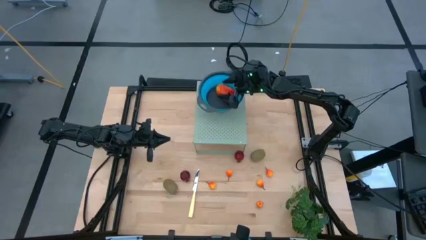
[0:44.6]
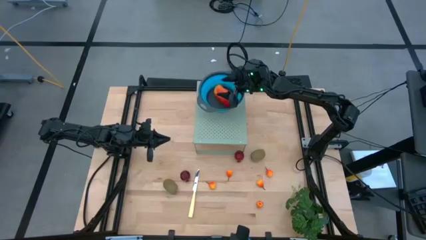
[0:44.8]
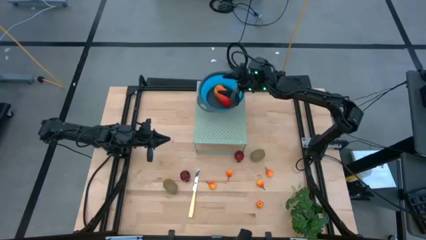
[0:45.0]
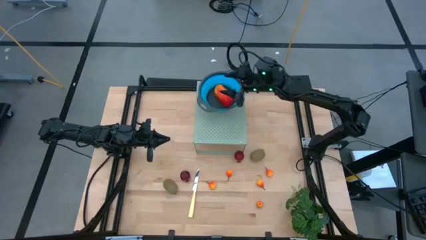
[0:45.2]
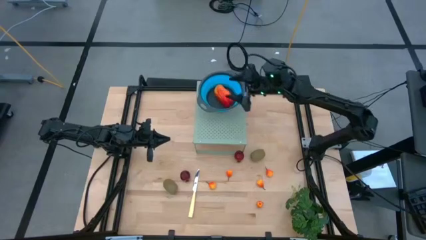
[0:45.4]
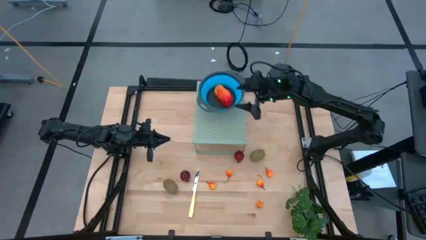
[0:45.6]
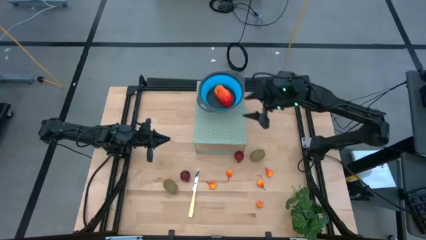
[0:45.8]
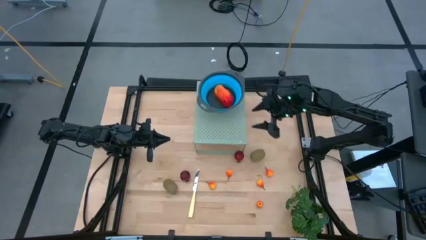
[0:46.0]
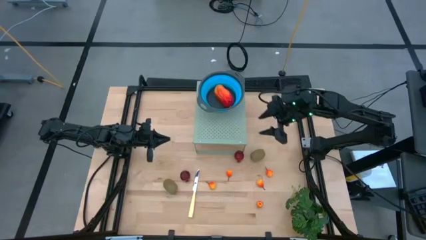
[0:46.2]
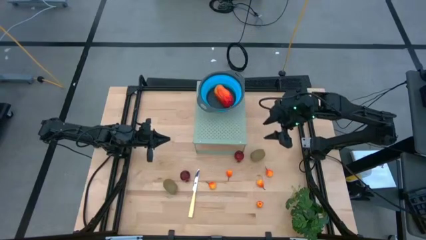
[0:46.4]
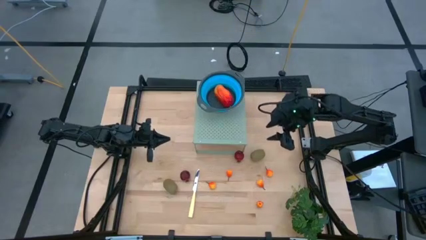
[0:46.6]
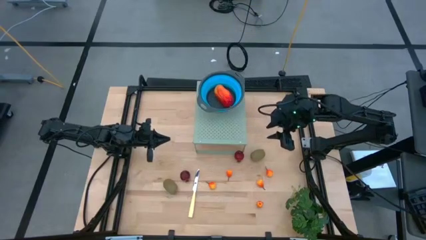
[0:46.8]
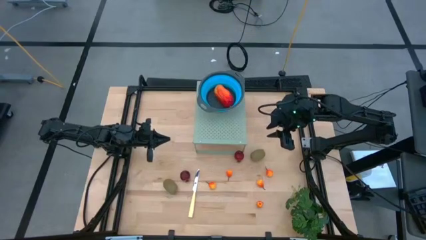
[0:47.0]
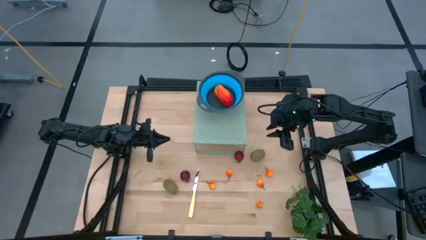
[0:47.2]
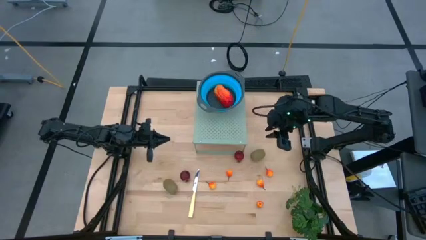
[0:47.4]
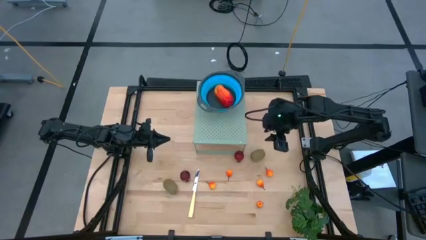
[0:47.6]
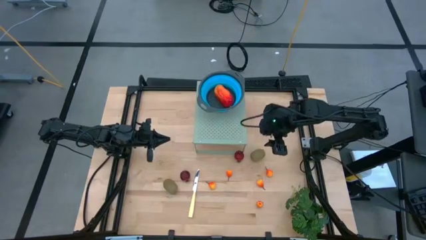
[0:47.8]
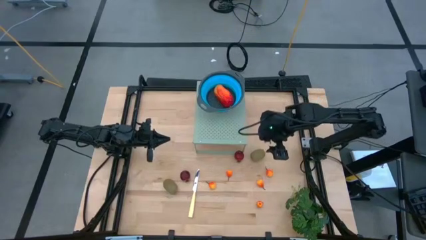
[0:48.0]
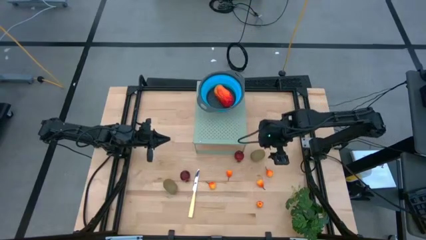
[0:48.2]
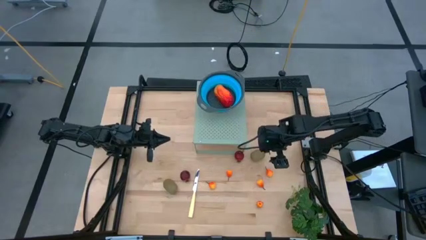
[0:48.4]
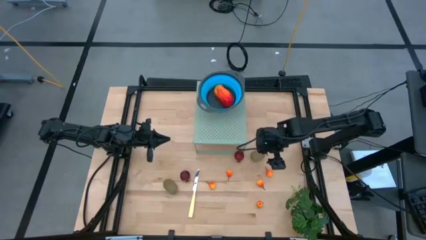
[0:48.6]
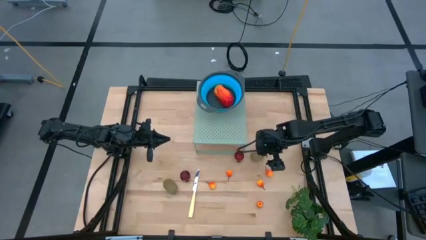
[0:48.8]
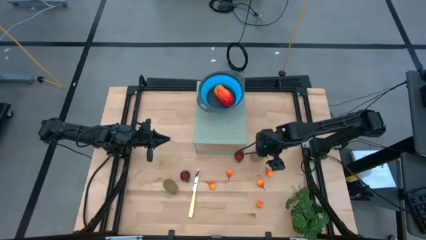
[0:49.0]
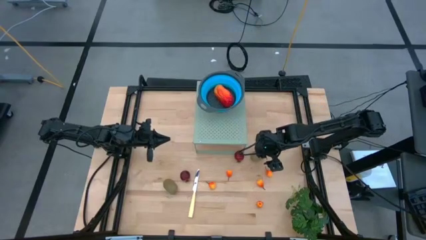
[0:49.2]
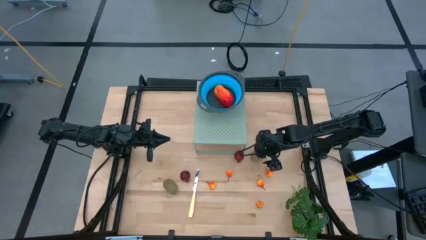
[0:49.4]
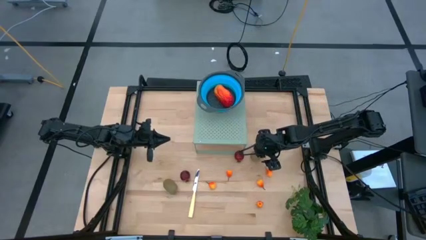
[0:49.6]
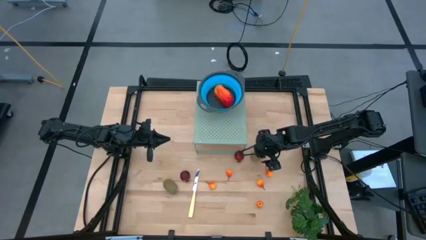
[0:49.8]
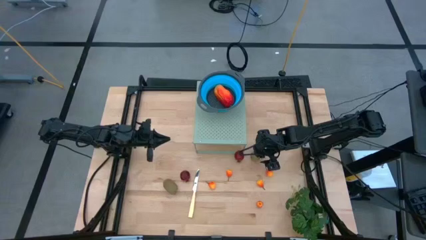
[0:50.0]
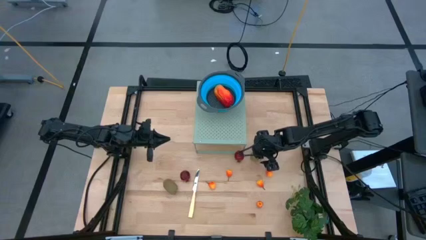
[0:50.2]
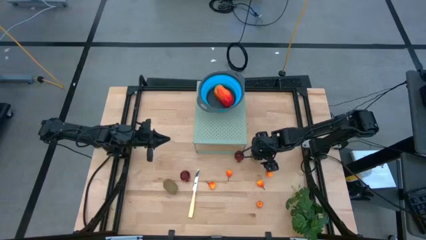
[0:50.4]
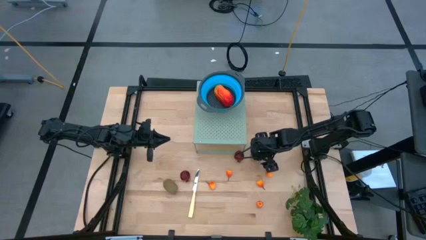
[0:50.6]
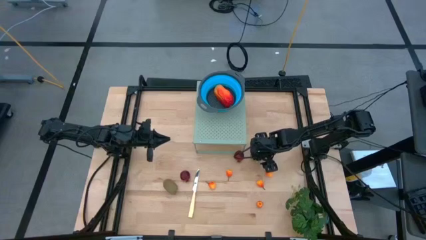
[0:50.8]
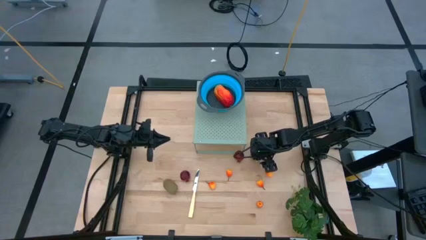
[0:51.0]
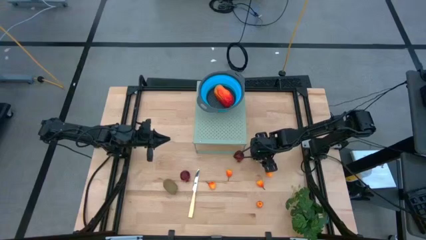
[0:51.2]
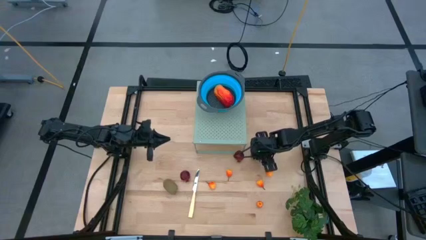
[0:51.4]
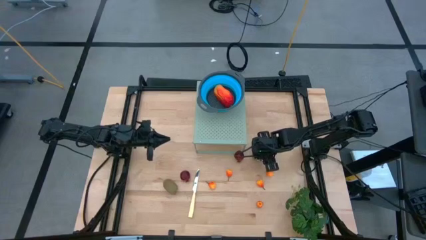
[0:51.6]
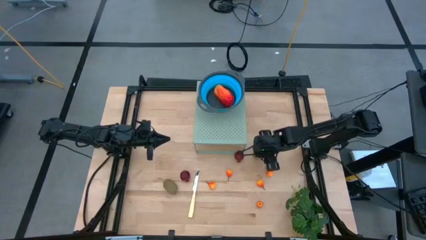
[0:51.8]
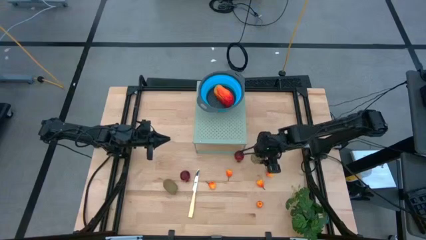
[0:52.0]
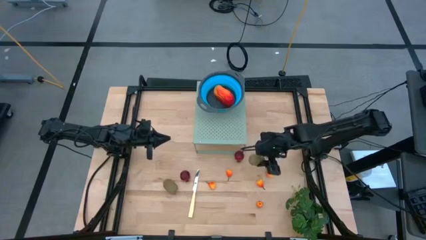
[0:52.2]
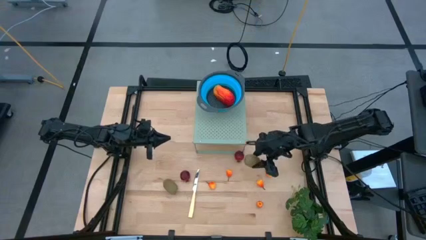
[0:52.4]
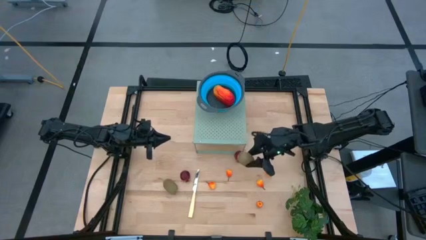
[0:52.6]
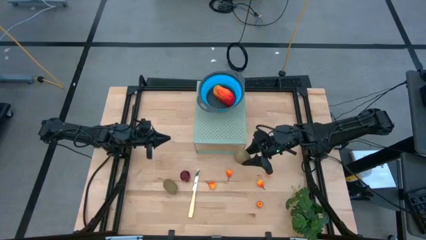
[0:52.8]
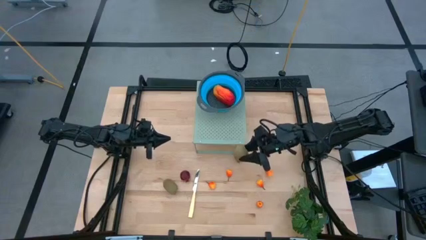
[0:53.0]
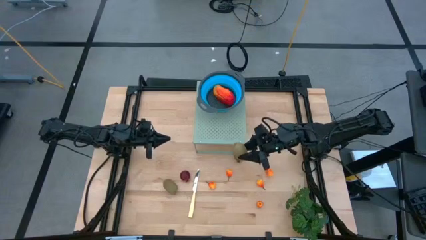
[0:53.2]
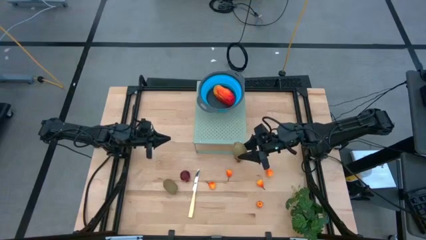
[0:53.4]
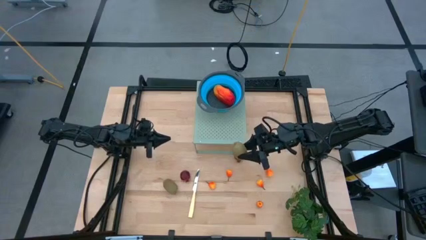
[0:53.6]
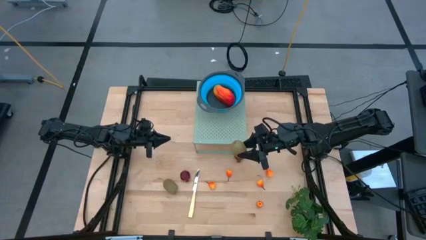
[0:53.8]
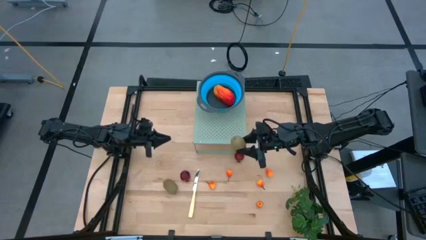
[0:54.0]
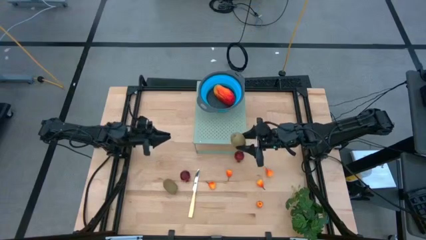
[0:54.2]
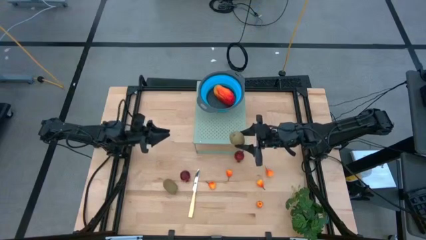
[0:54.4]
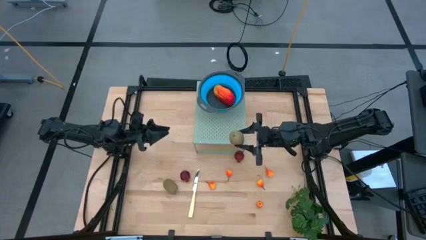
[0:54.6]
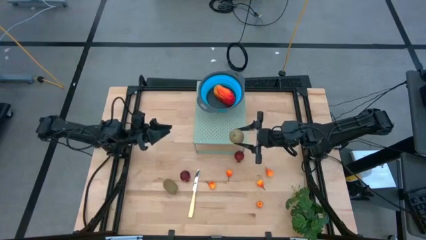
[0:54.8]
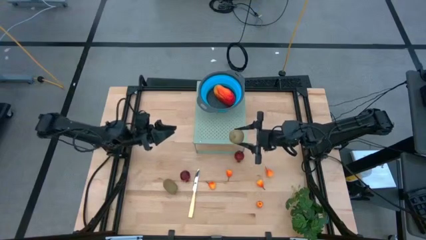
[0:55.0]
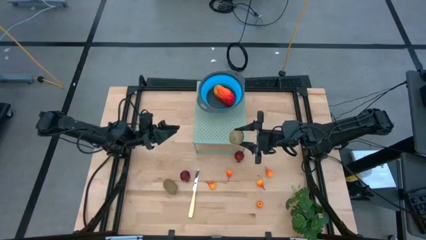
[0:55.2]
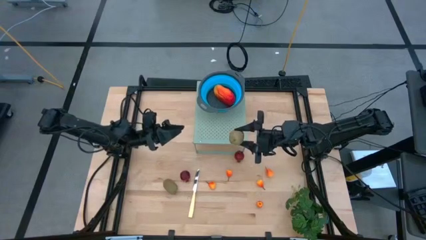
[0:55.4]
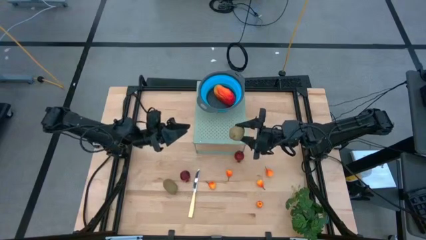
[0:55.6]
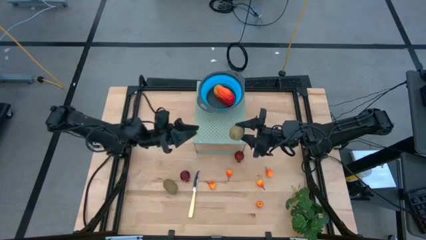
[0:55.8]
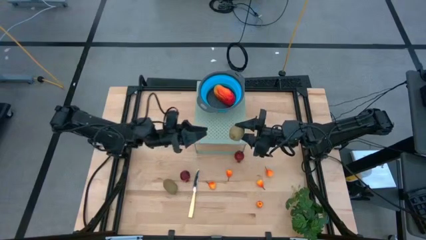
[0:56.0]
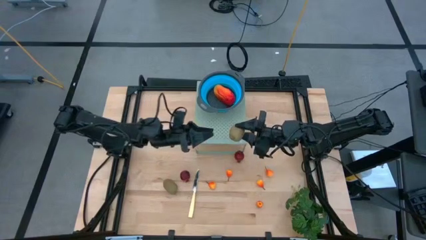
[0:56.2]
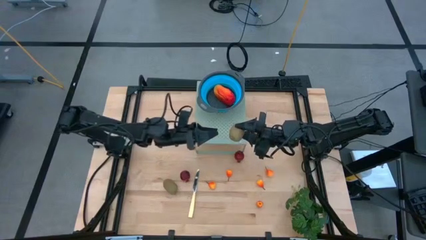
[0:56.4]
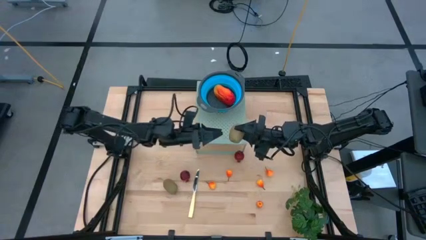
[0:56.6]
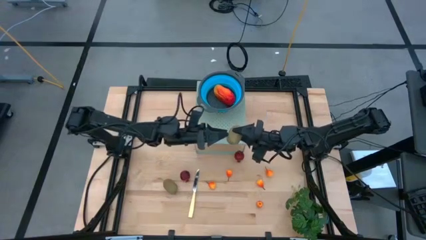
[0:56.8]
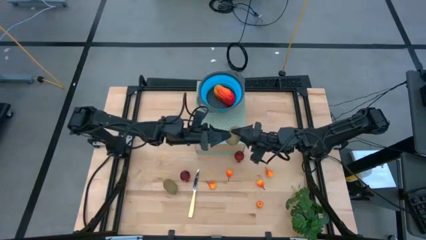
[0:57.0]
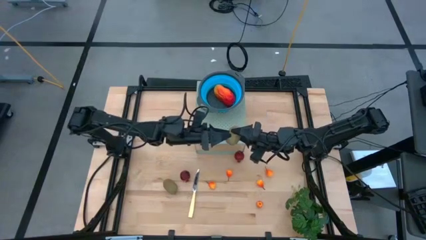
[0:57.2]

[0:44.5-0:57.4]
Task: Pick & Place Fruit
Put the kiwi into the blue strainer bowl on the shelf
